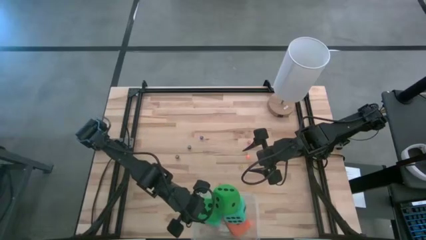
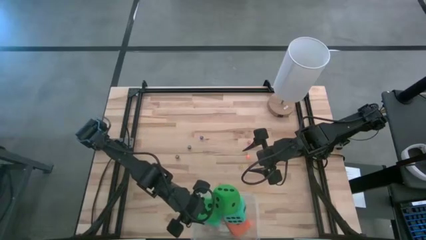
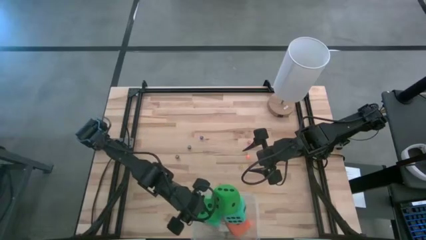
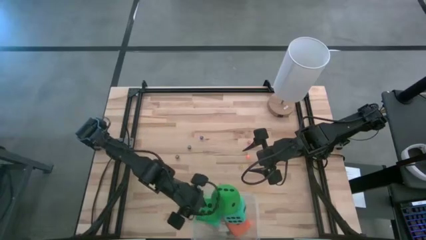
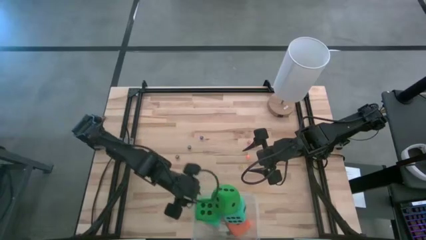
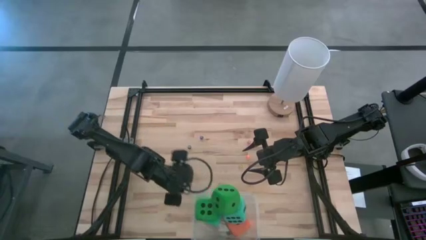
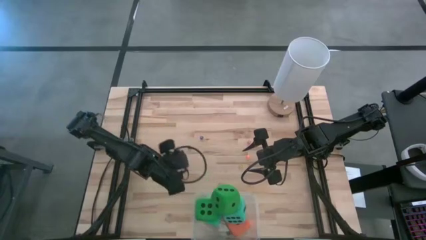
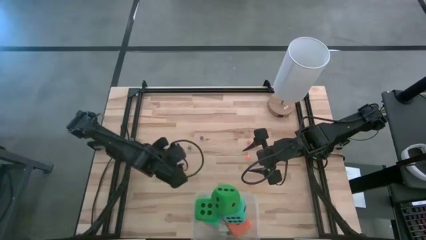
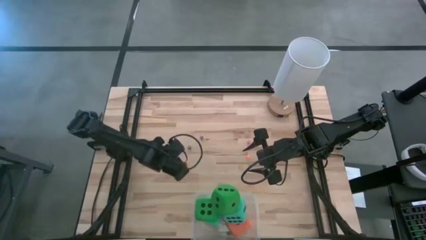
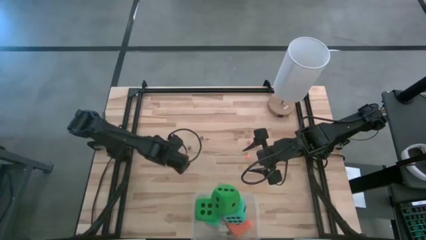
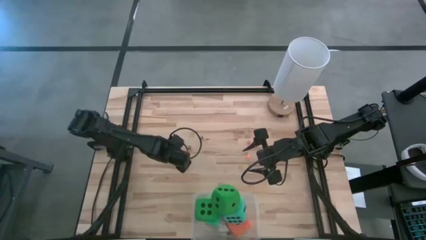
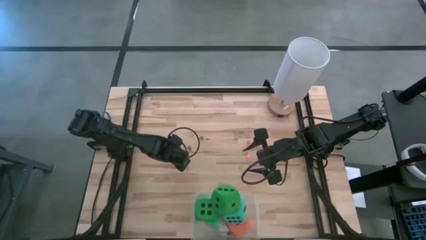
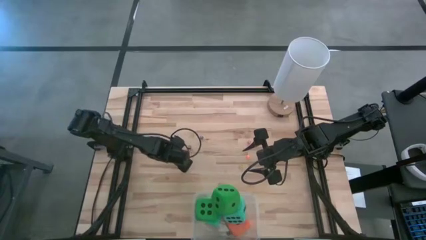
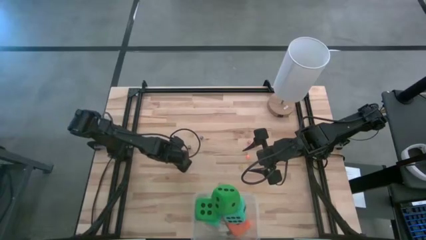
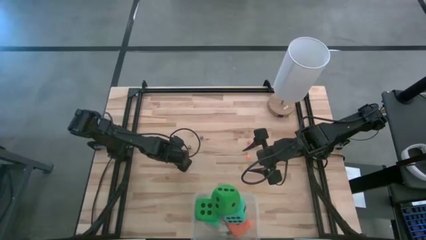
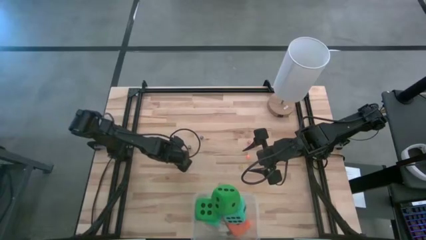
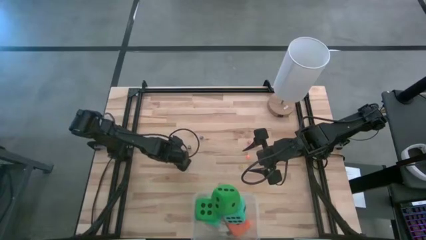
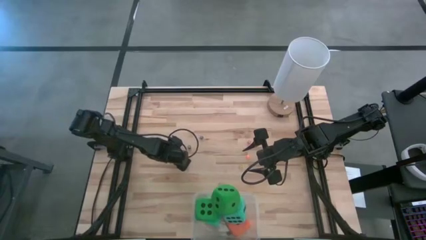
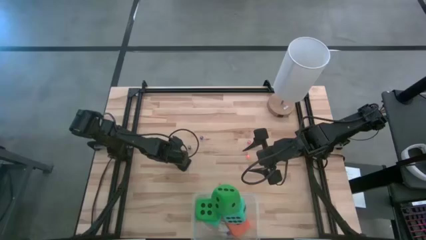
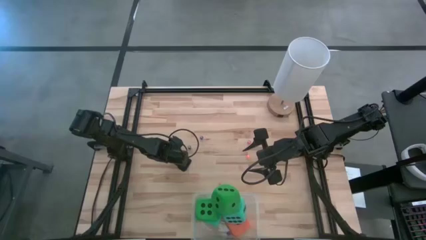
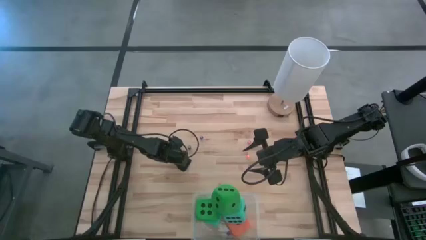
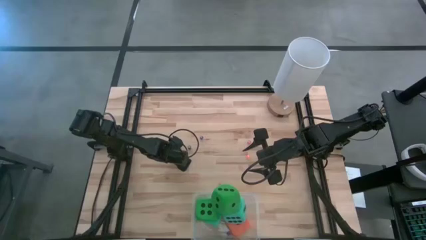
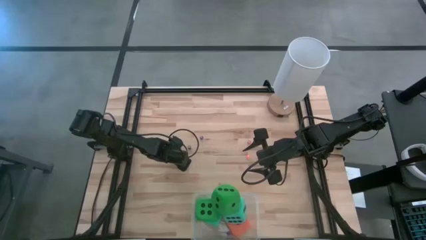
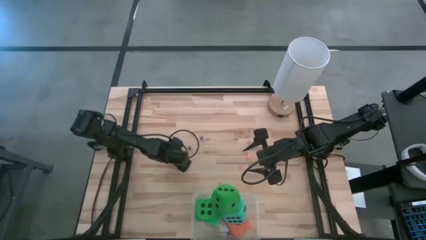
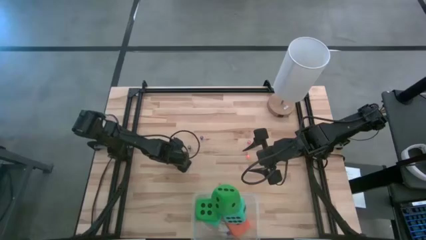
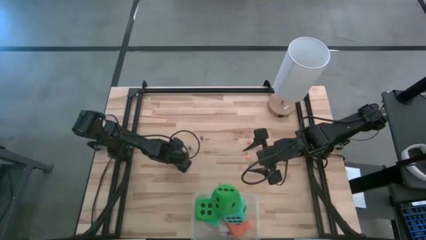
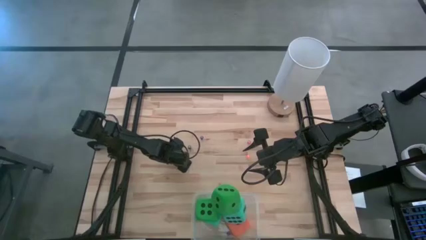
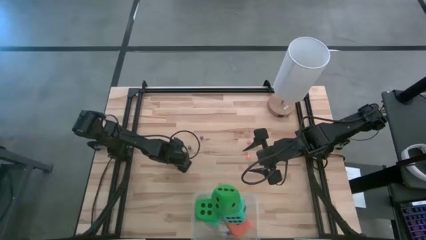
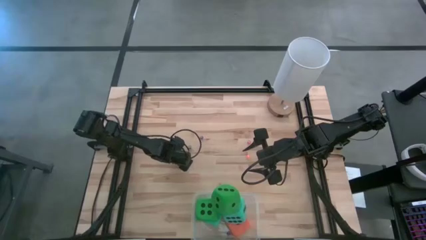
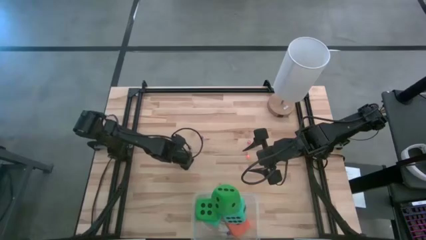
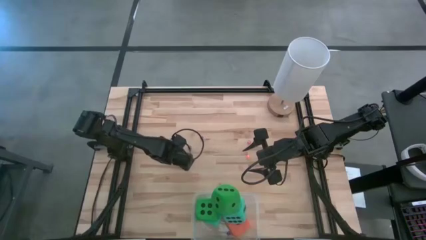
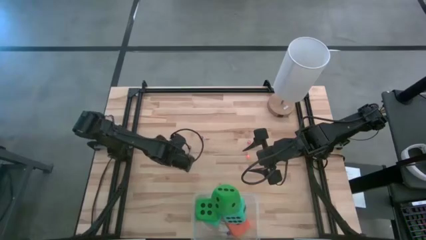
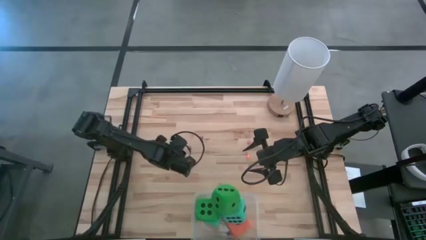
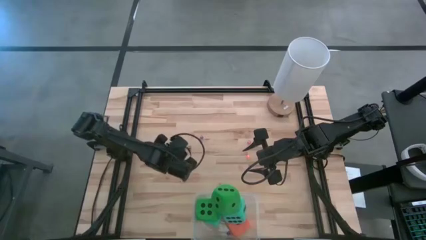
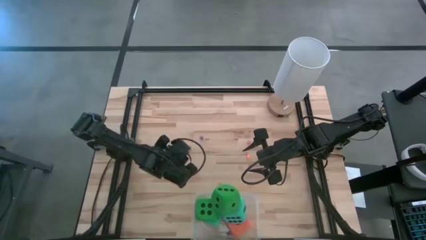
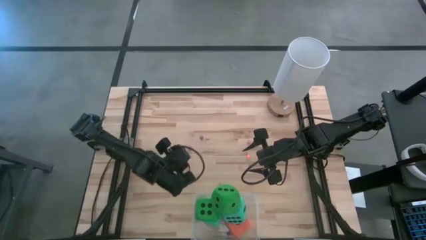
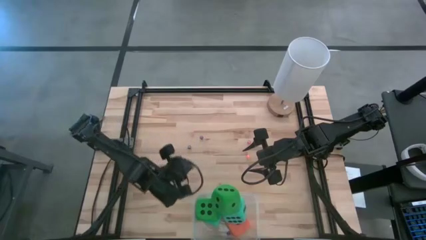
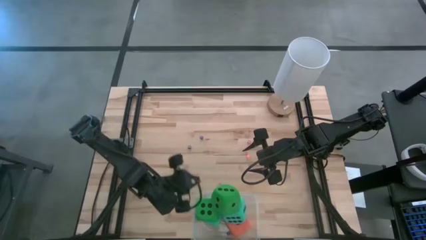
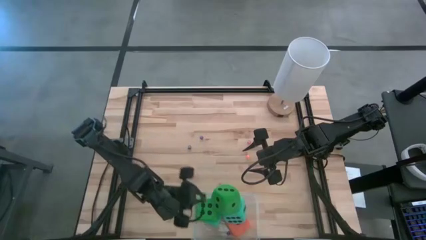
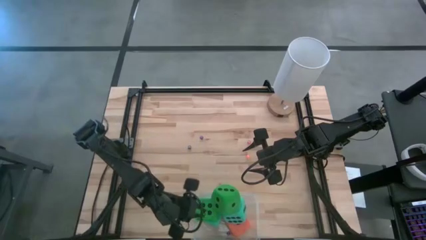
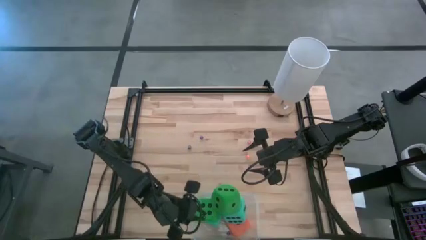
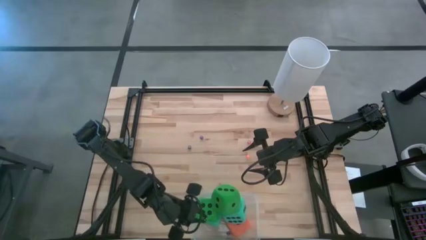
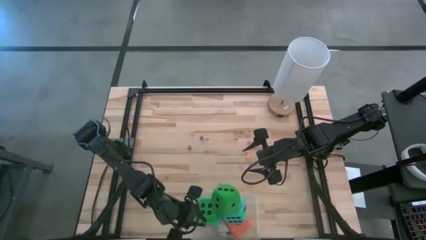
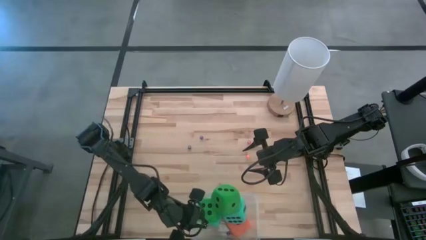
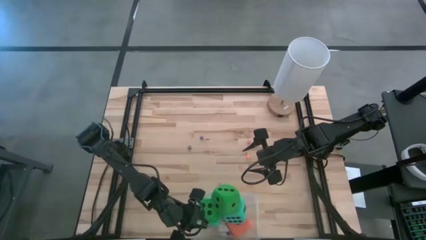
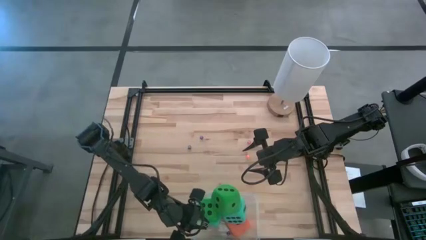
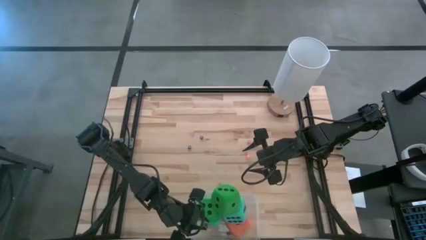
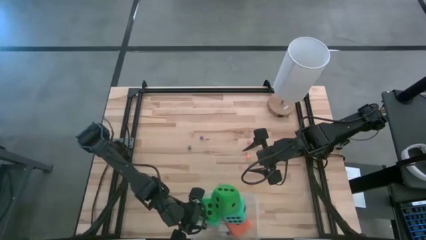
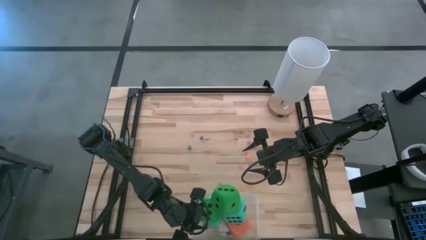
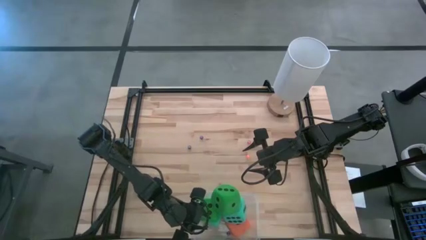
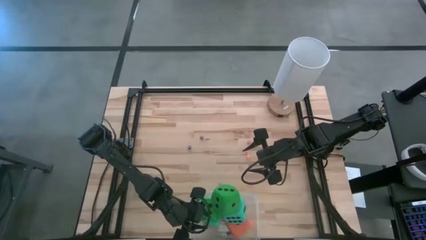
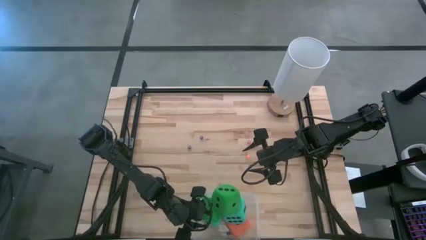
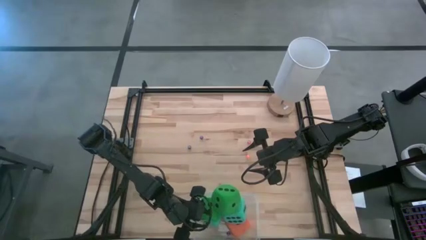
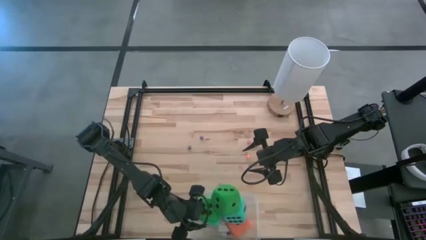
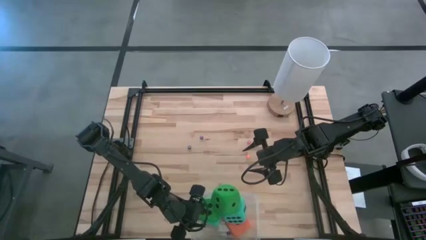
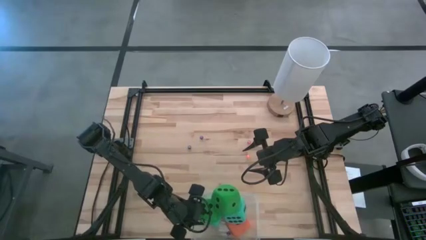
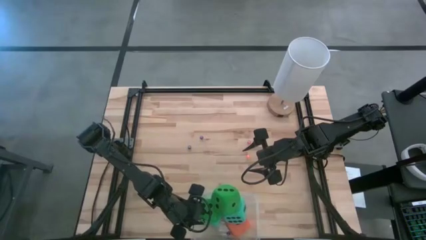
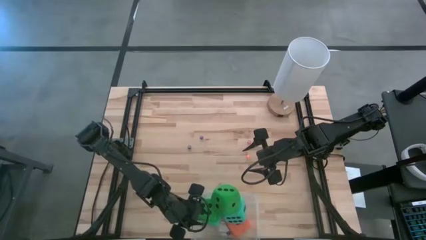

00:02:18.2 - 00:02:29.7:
Task: Pick & Place Dice
Put the bottom small black dice into the transparent bin

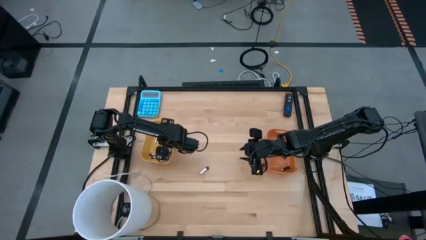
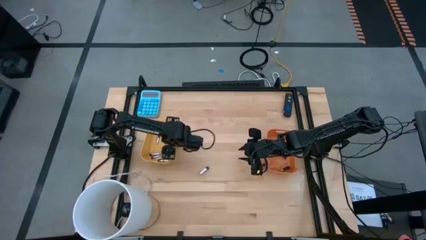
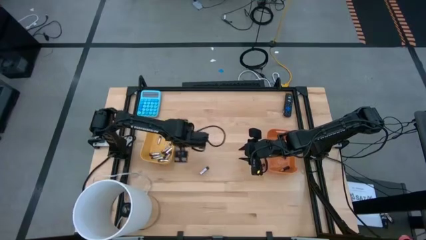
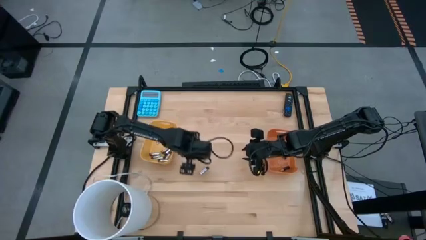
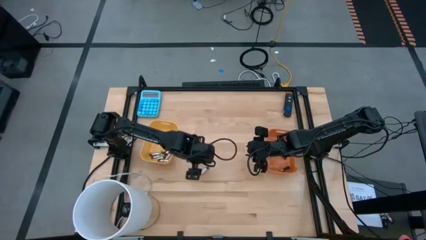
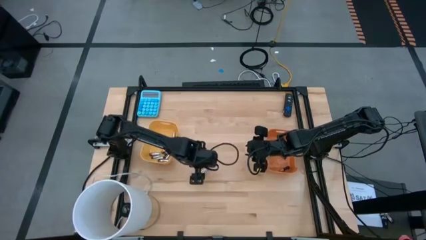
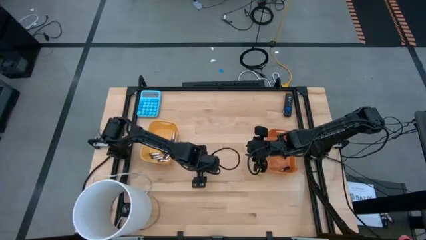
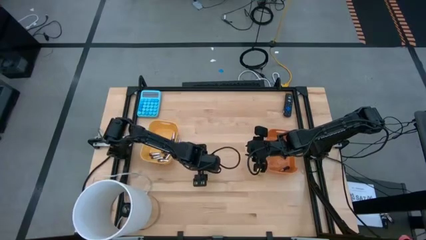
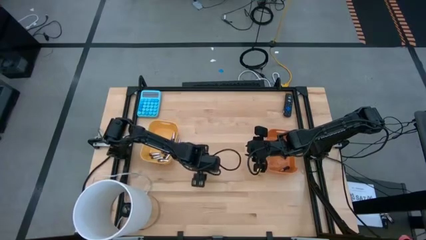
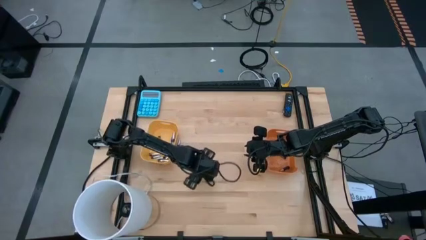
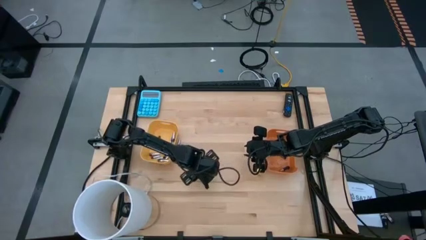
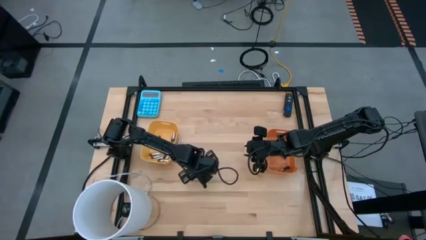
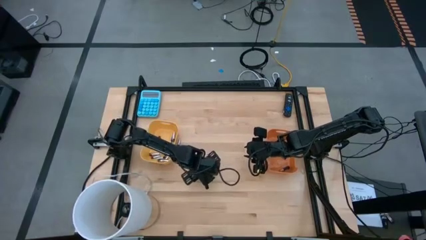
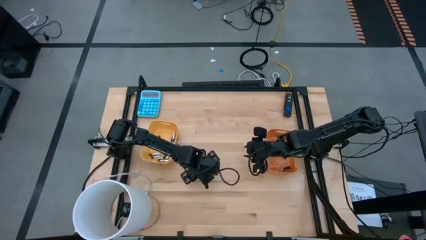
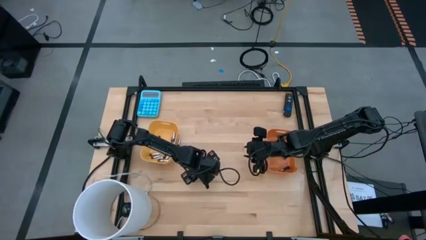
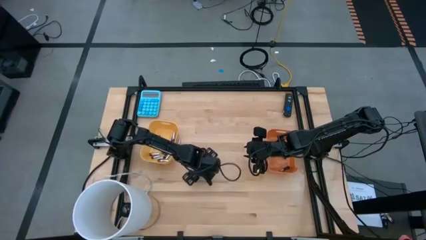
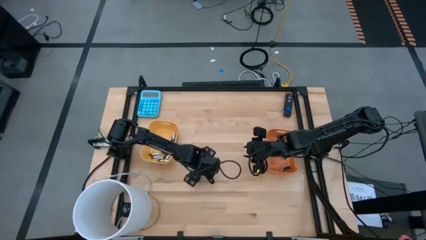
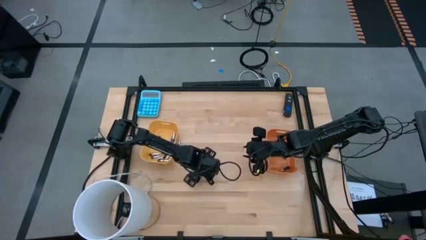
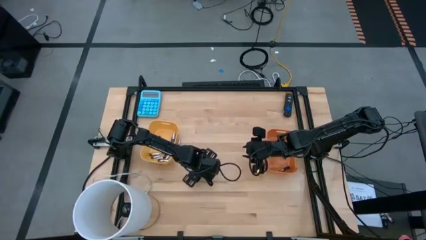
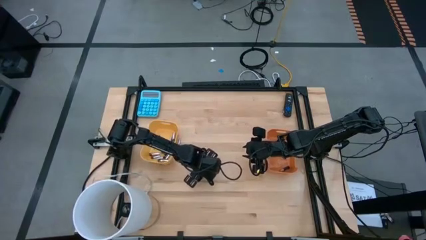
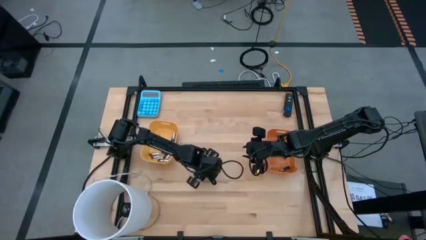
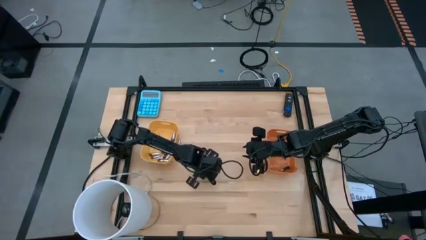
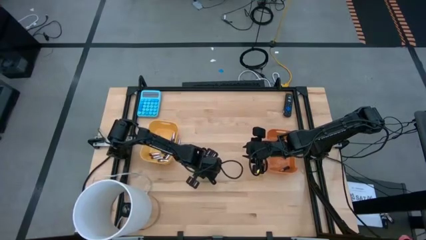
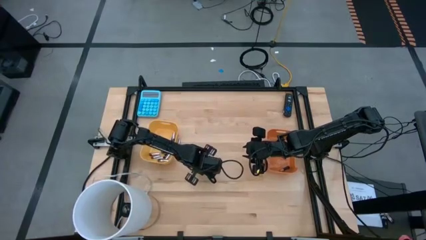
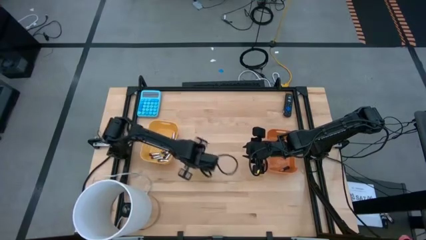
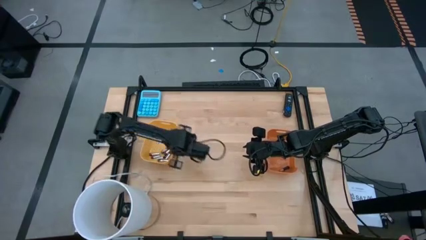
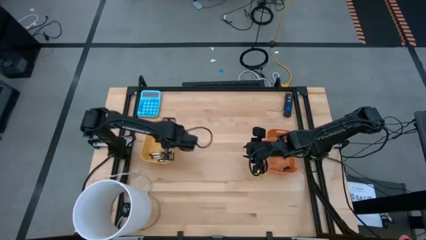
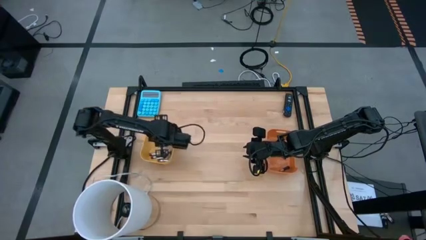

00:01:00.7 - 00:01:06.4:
Task: Sort batteries
Put the silver battery into the yellow bin
